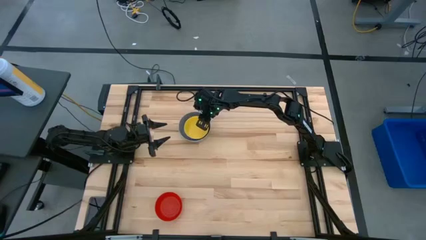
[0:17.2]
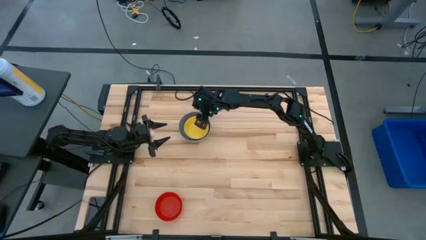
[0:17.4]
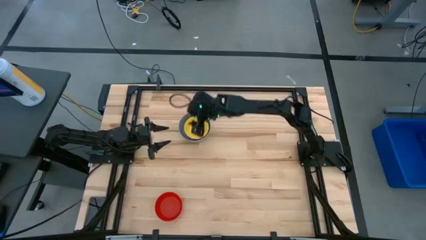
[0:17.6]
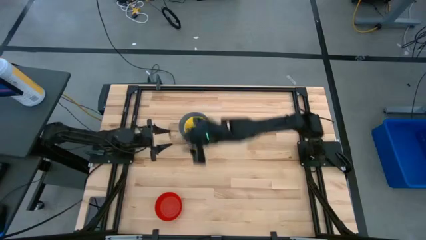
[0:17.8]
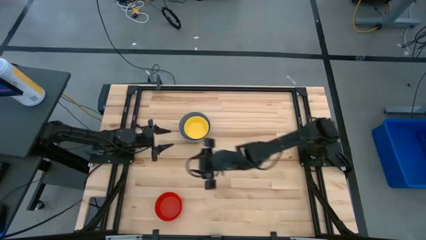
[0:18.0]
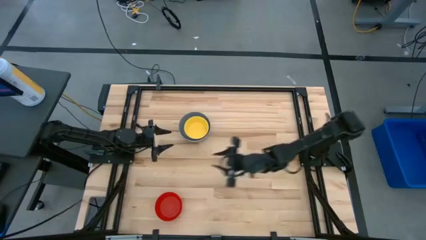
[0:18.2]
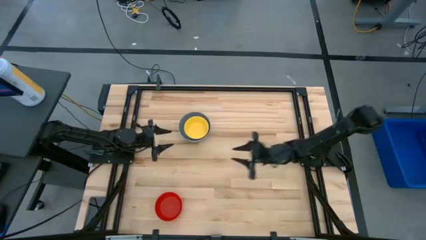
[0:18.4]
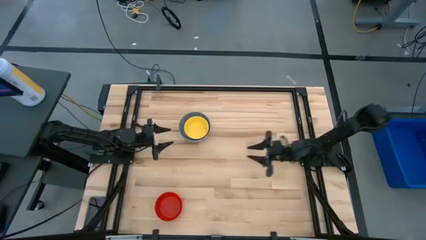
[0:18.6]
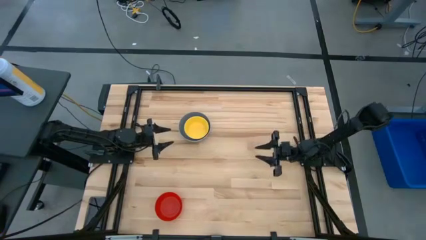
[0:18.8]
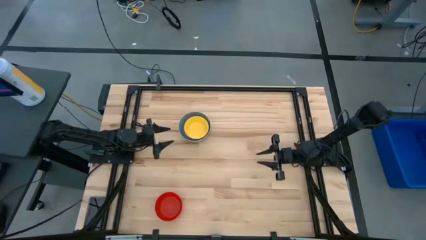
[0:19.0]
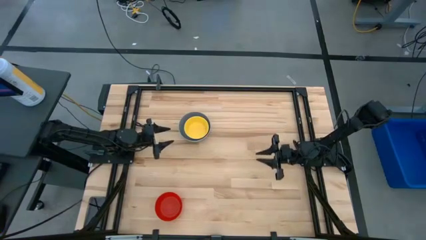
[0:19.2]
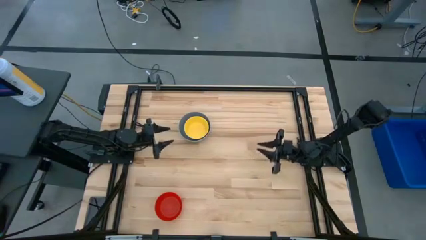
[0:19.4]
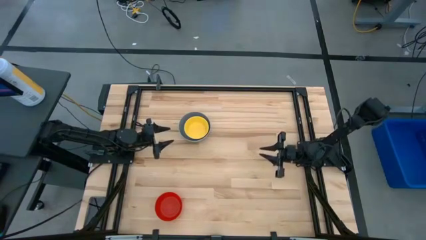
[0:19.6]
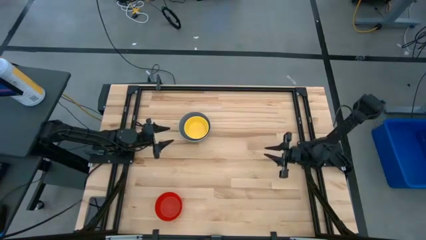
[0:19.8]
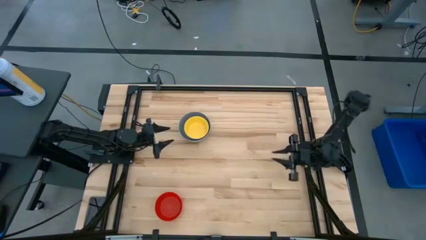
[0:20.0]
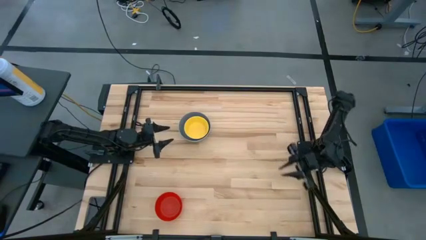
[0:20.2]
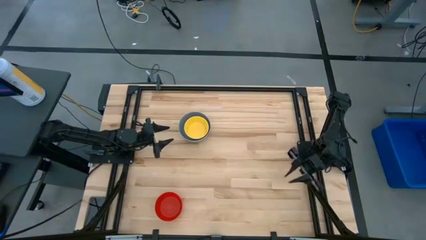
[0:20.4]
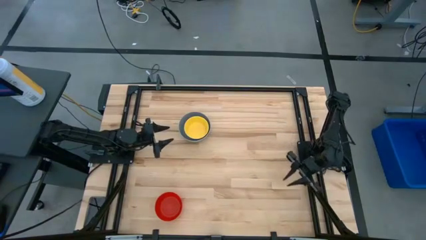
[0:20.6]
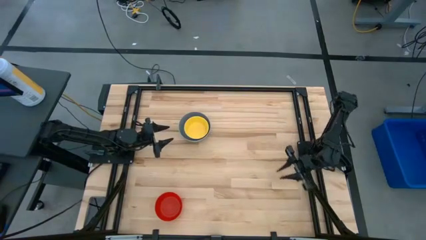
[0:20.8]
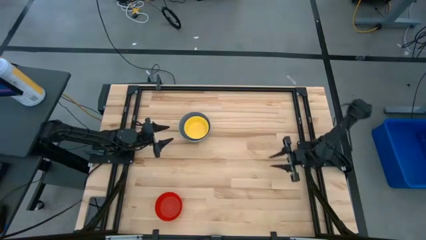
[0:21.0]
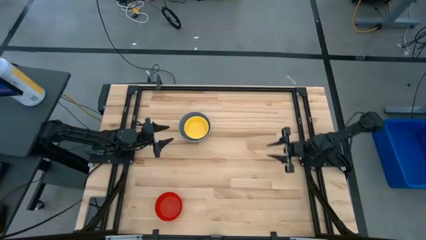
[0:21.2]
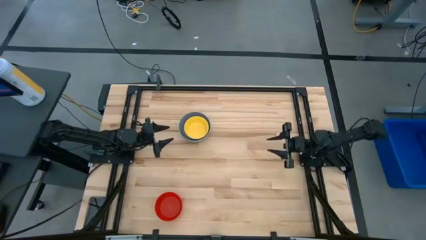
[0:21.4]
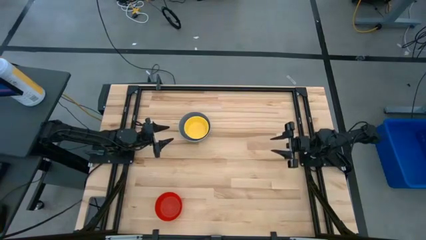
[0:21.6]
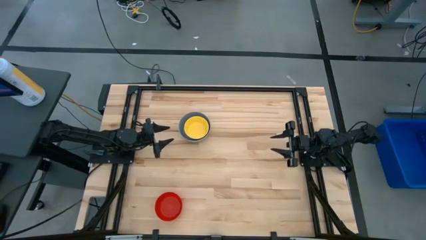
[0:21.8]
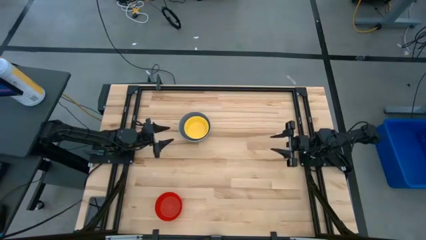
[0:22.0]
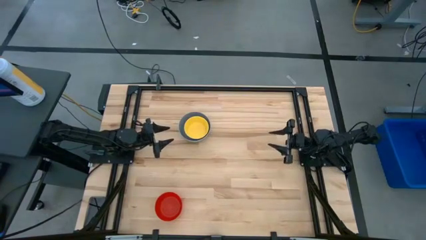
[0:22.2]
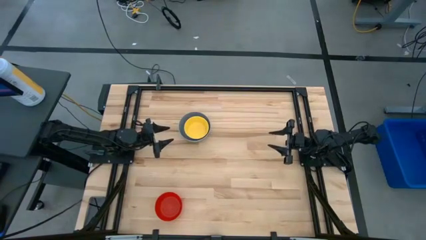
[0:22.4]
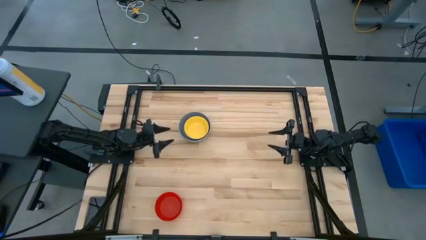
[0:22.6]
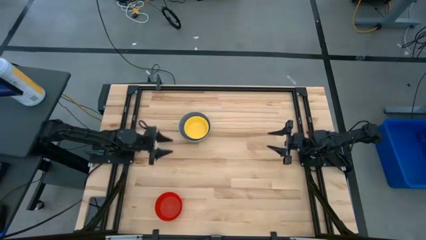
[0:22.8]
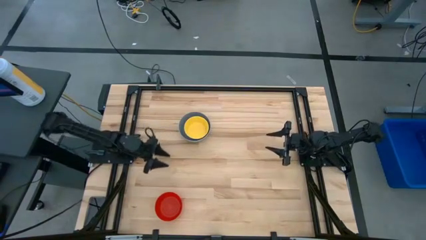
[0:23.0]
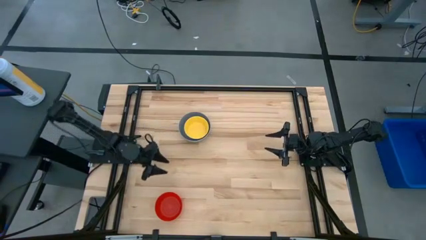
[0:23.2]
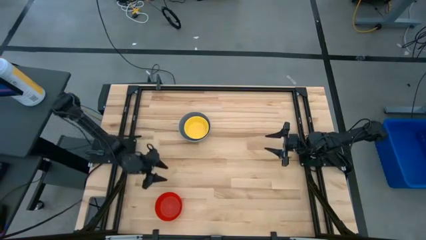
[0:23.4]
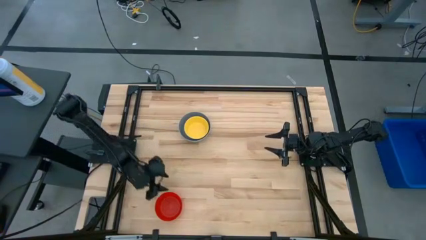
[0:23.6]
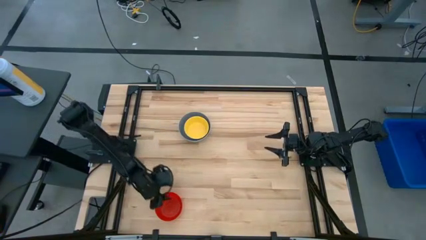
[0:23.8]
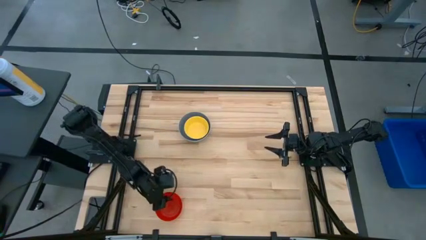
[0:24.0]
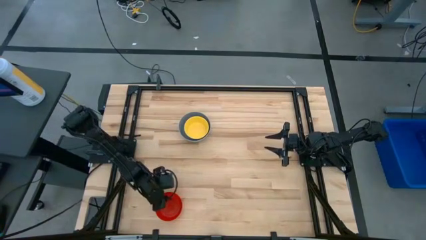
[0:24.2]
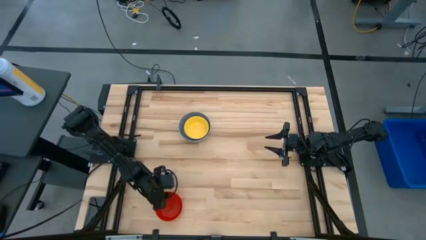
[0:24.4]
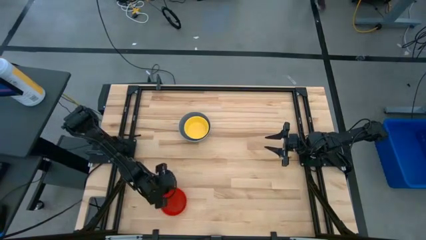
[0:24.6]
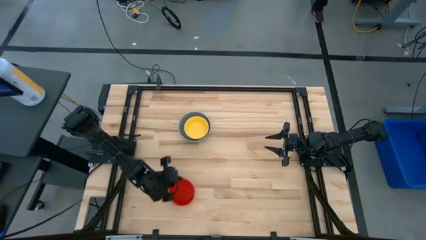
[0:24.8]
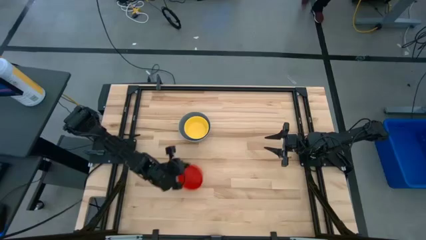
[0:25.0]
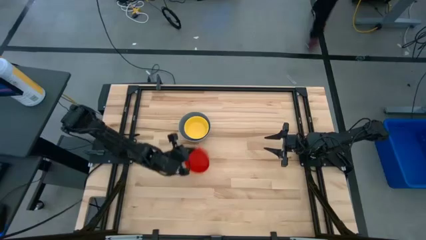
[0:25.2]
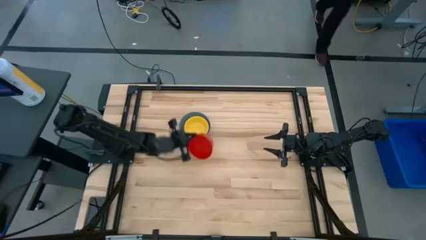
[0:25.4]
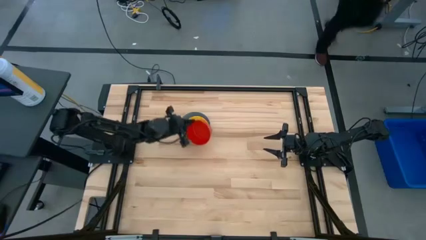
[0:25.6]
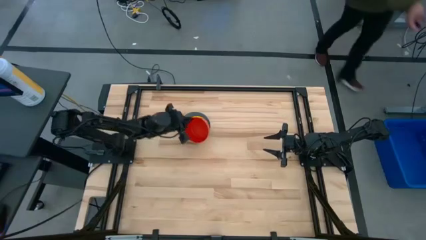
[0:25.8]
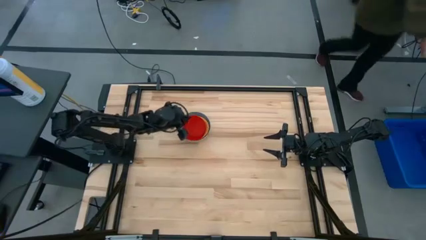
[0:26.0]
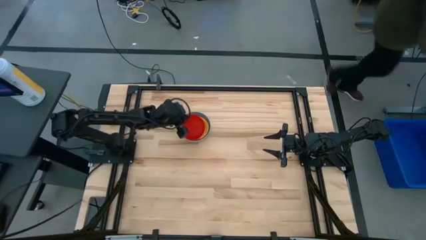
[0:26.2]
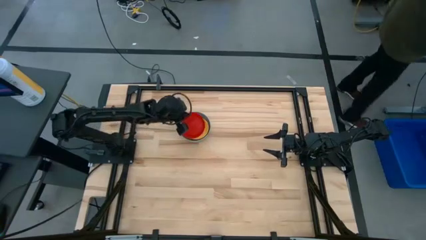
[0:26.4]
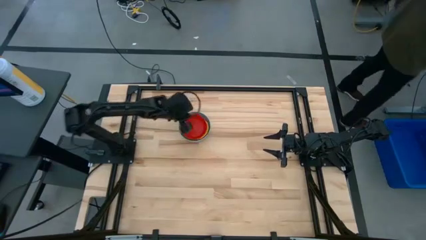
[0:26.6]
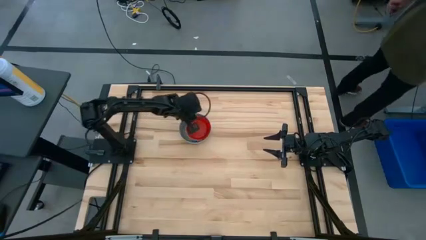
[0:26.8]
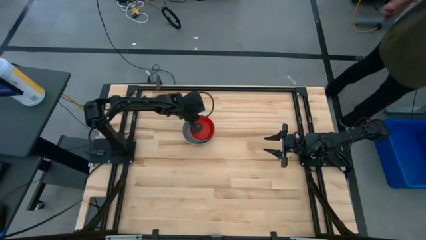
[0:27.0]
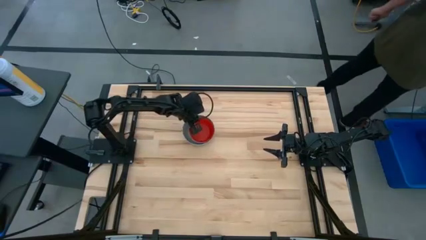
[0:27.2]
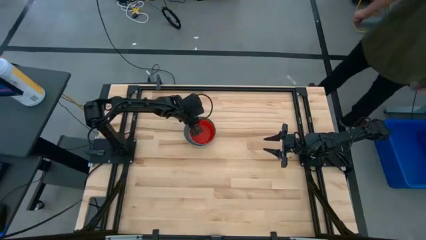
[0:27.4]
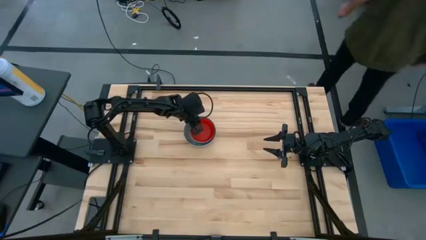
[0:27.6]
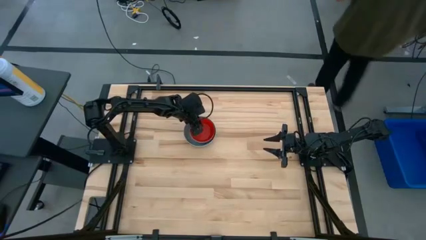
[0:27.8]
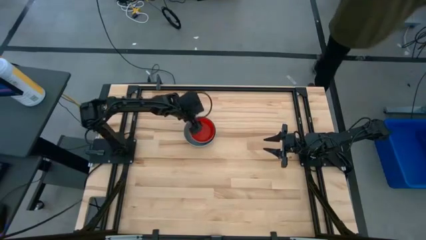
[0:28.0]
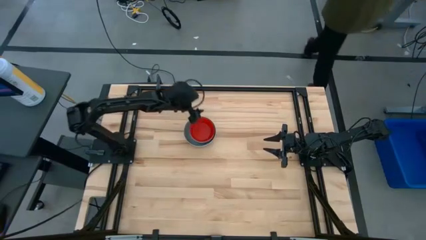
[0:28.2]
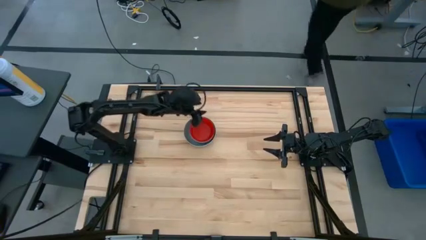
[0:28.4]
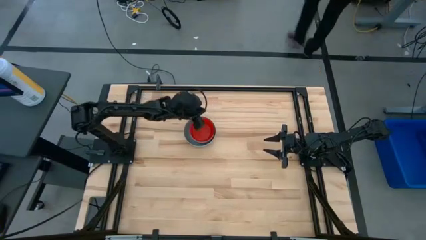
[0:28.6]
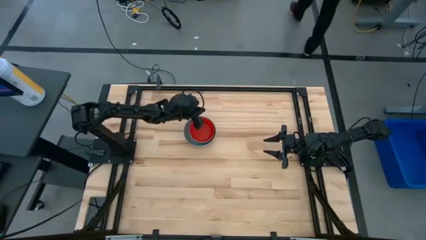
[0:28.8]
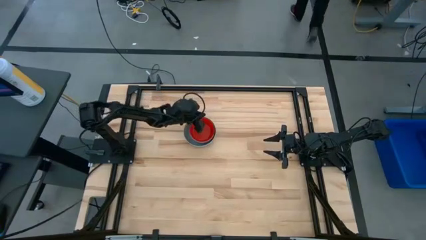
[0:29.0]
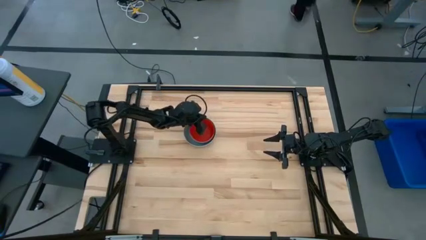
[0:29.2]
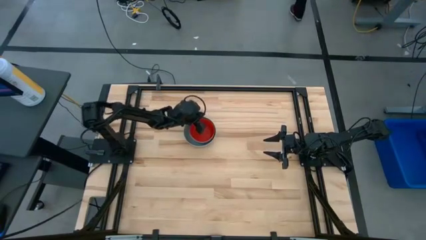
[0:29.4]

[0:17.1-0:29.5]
Stack the red bowl on the yellow bowl
